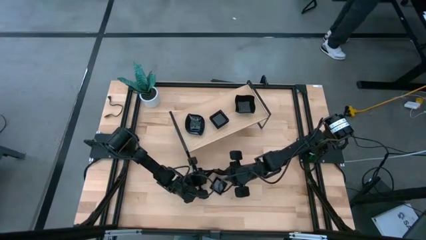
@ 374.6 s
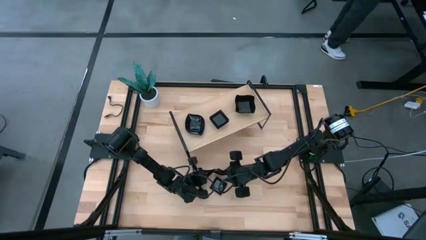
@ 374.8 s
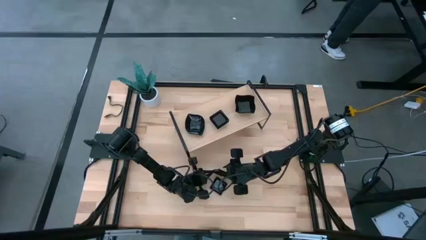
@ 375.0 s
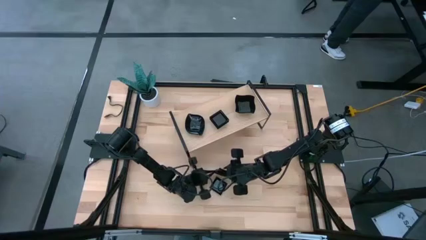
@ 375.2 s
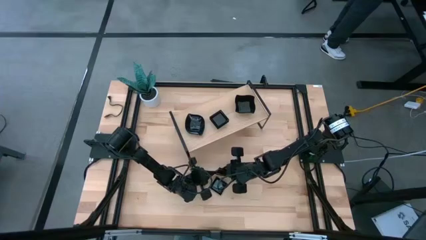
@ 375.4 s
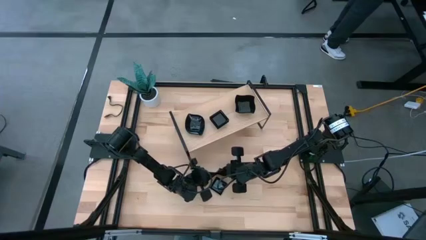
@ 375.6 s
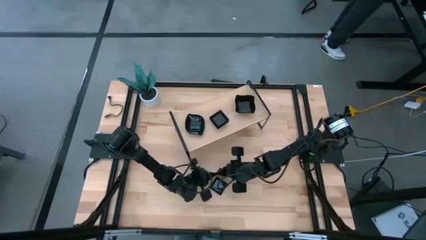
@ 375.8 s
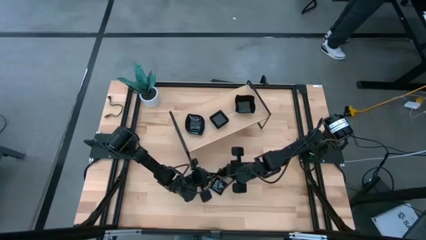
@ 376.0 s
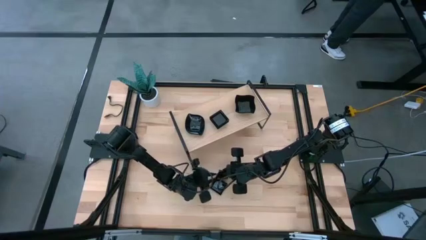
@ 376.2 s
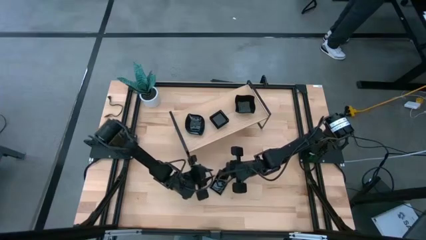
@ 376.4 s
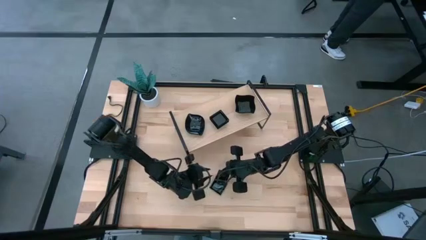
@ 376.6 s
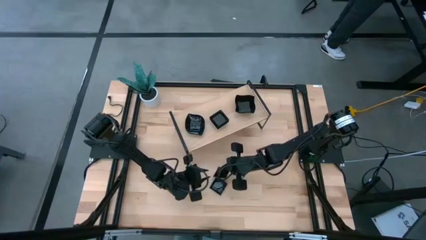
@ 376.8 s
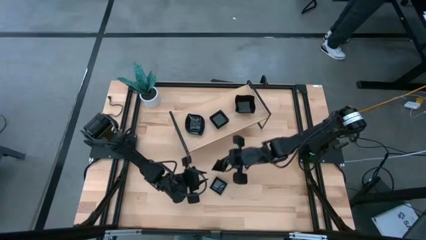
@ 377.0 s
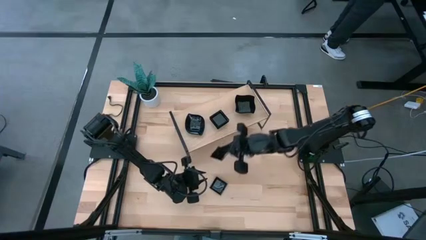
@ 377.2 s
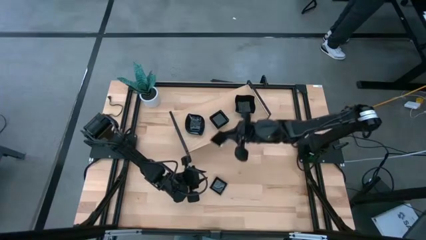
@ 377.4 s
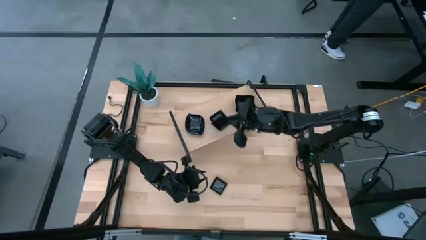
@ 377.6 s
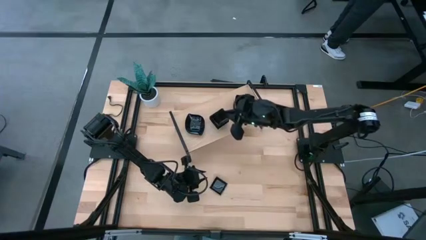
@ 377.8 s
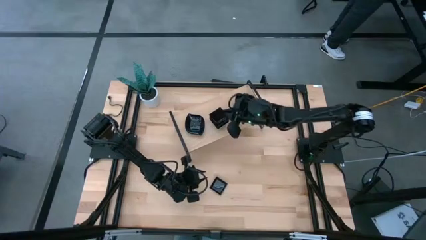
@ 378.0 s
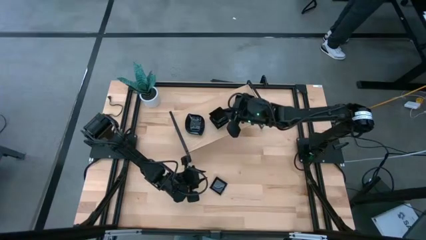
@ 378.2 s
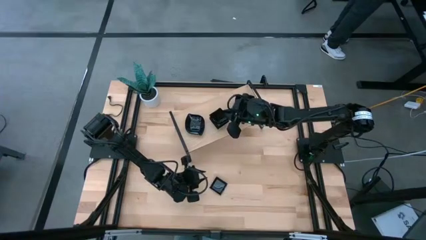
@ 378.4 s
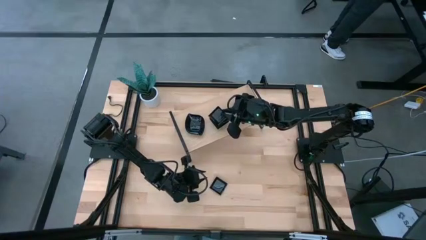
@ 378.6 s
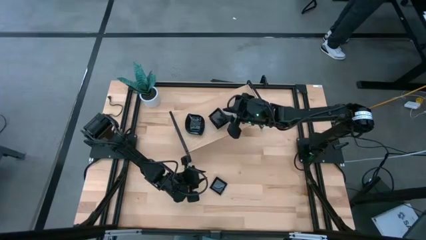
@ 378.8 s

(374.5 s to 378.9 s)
Task: Pick & Place Mini shaped plates
Stack the black square plate on top of the black square plate on the shelf

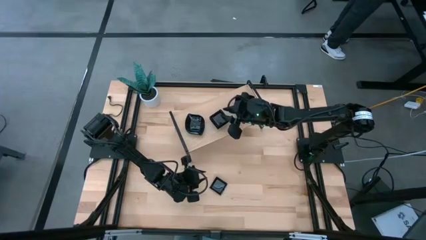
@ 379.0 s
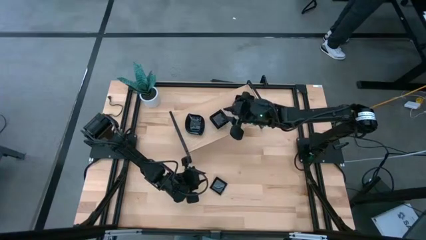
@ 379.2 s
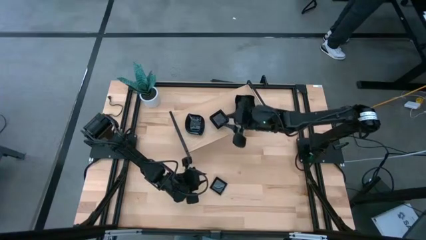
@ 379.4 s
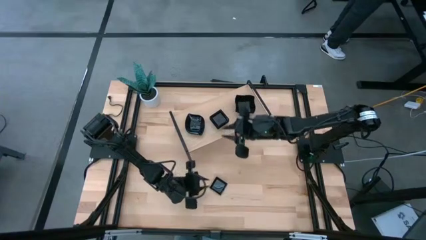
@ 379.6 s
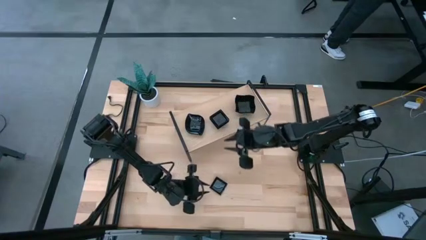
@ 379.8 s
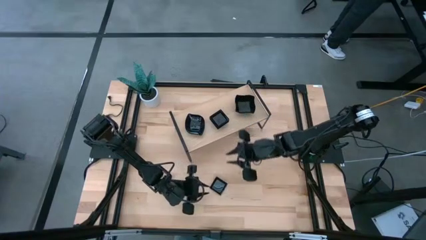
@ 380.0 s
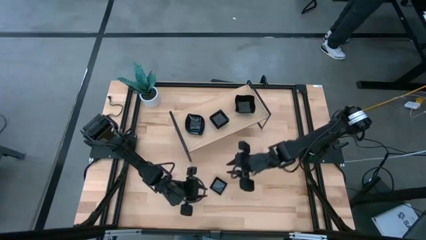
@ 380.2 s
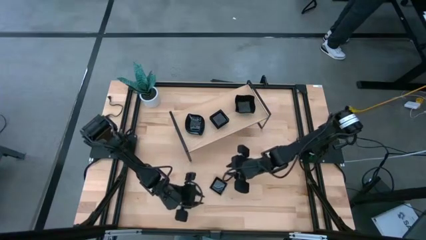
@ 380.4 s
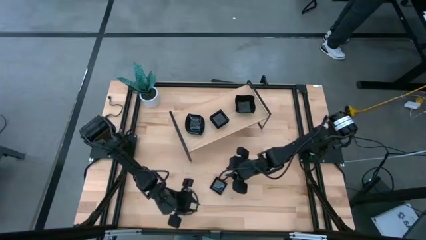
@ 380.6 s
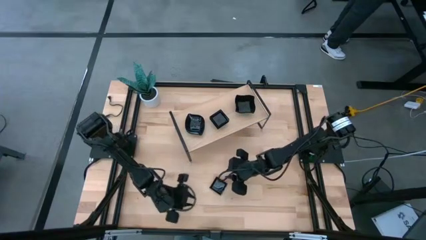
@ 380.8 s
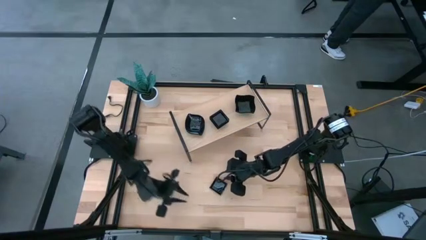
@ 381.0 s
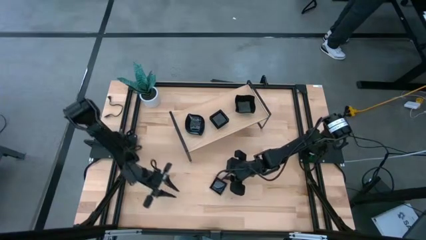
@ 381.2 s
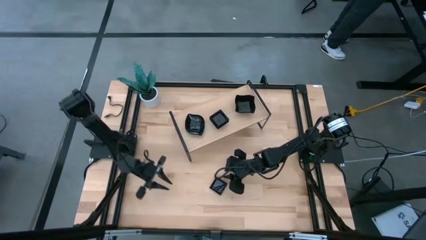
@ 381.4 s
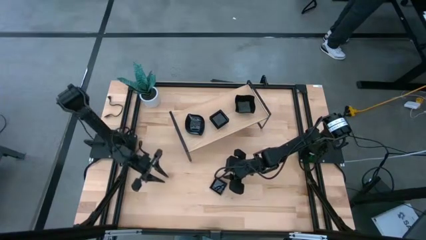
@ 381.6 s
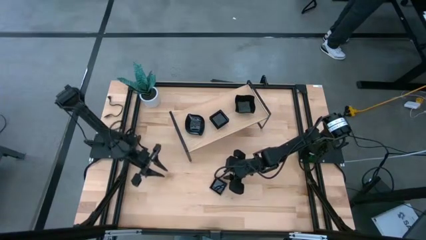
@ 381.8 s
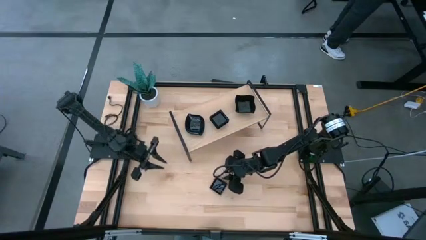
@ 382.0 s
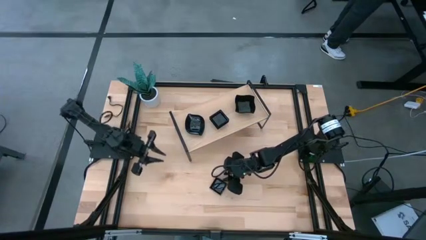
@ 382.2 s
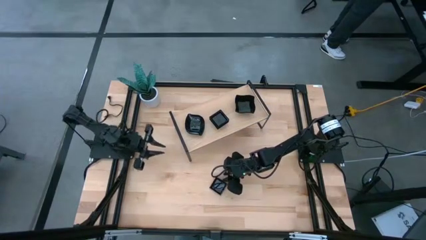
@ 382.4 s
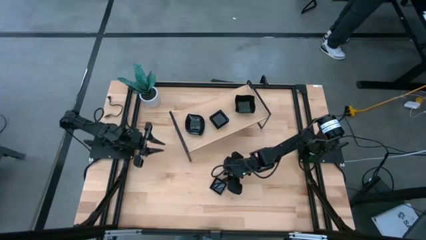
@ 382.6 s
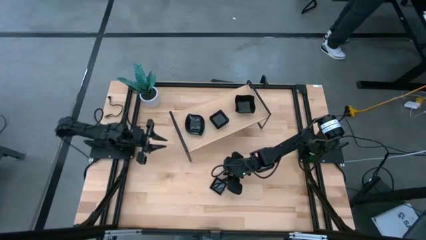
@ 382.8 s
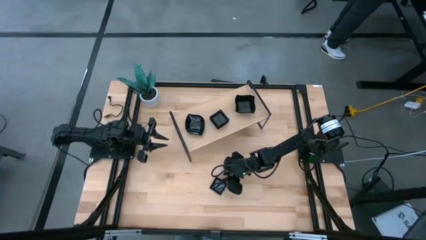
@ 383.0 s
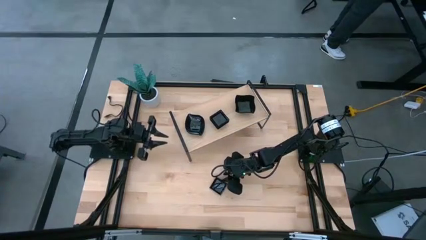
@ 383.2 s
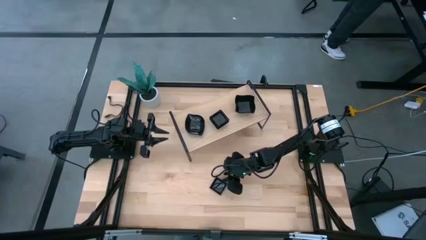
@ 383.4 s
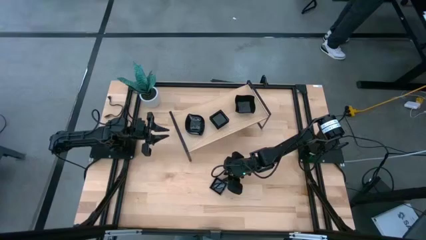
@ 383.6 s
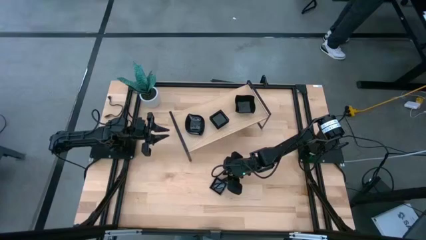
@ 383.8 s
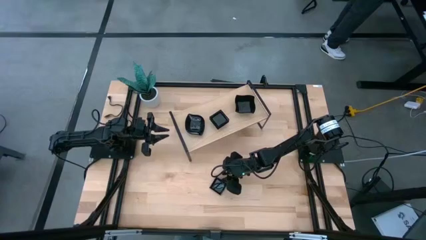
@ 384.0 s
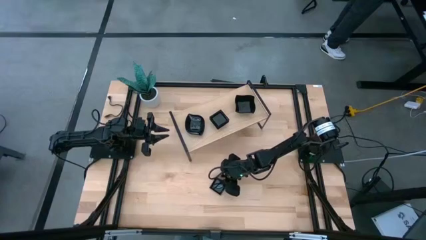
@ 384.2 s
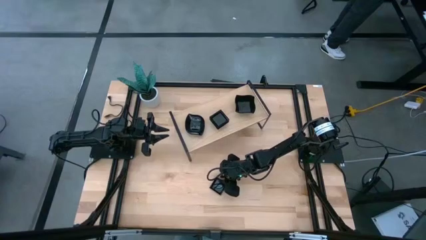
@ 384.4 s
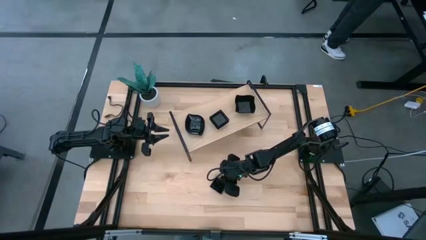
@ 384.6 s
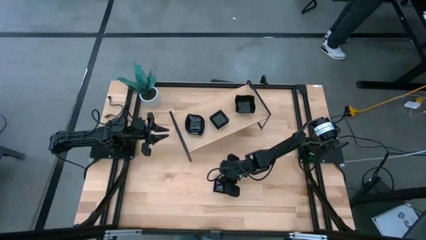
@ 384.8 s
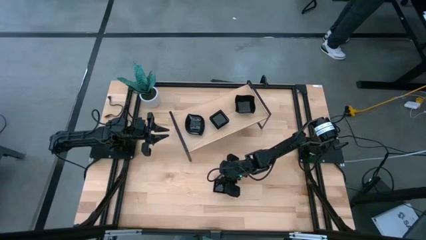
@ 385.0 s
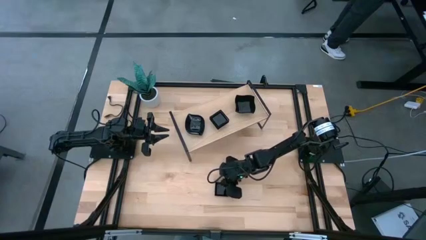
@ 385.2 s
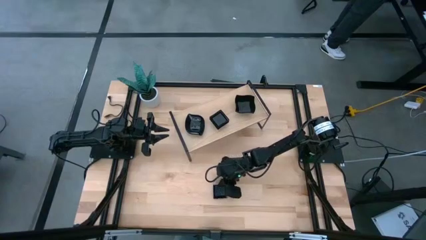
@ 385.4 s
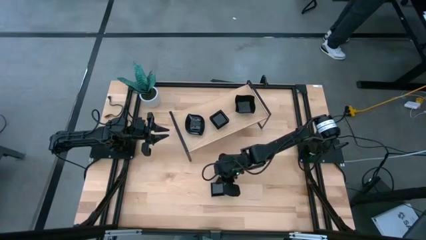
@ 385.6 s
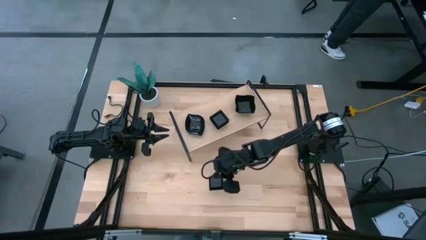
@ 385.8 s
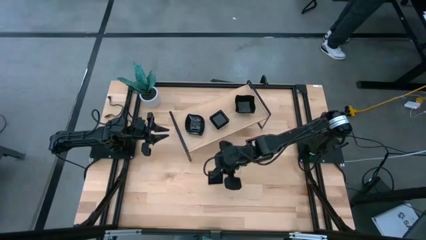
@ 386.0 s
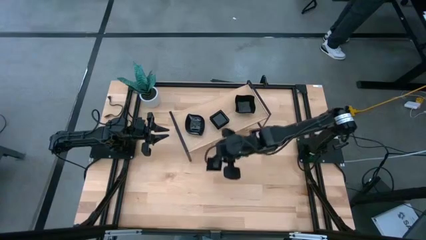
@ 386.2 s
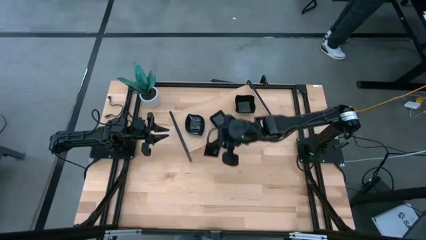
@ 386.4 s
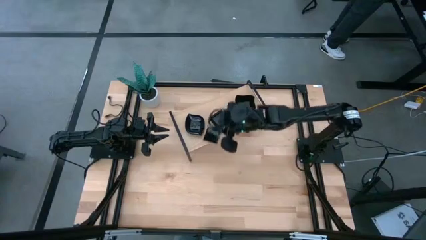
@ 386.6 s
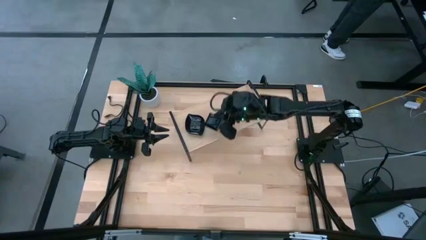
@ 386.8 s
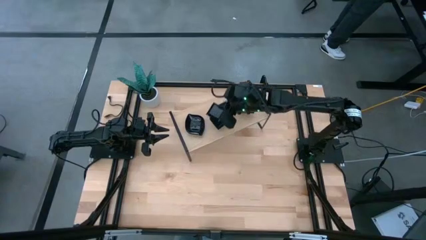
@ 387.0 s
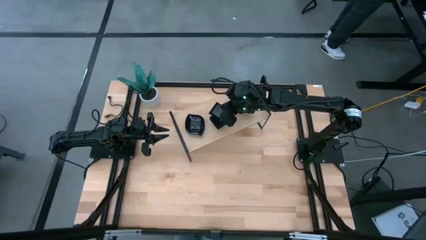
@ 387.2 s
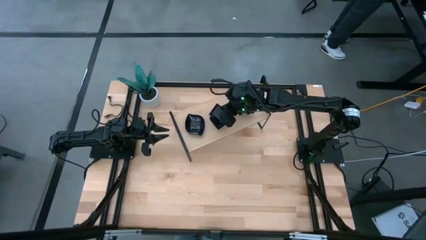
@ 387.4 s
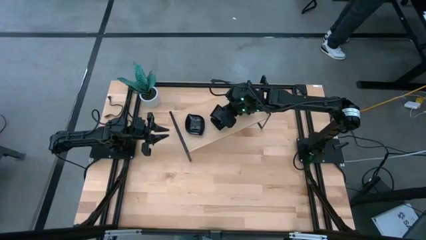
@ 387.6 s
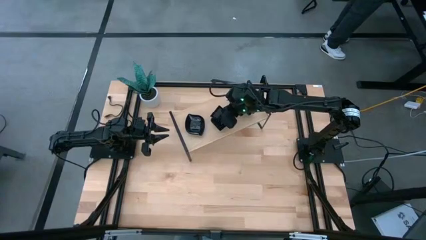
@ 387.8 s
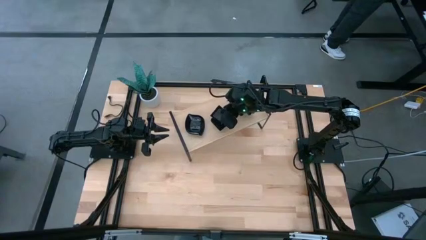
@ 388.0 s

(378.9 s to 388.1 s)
Stack the black square plate on top of the black square plate on the shelf

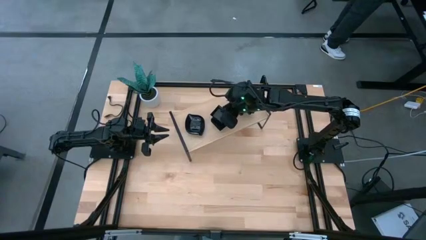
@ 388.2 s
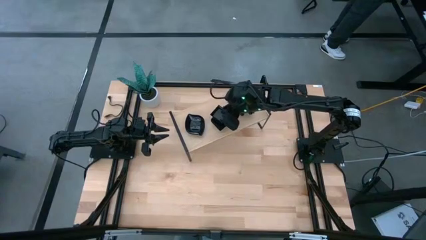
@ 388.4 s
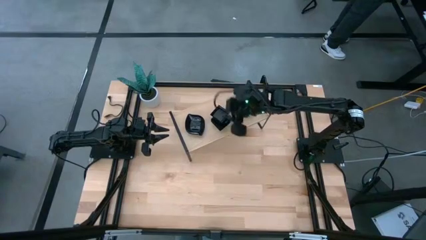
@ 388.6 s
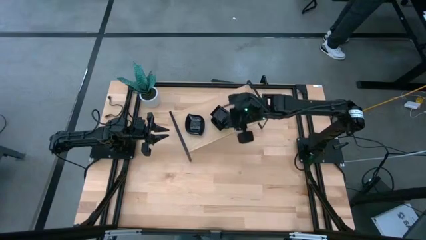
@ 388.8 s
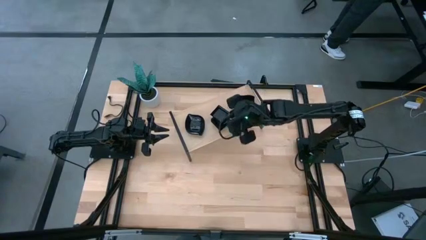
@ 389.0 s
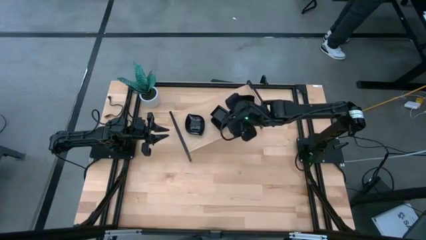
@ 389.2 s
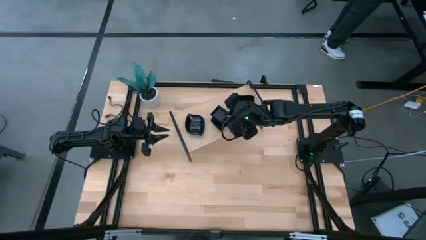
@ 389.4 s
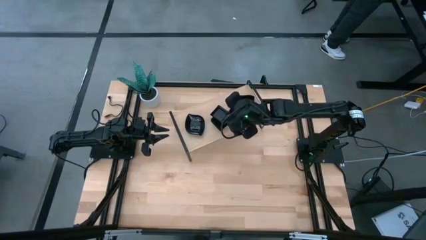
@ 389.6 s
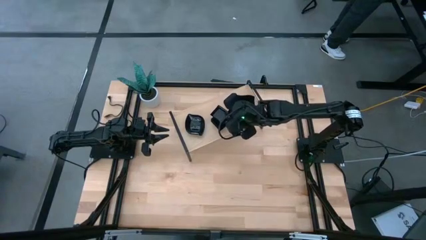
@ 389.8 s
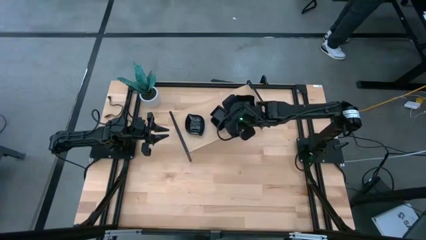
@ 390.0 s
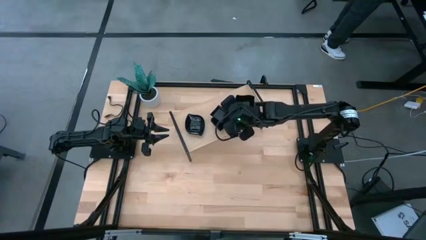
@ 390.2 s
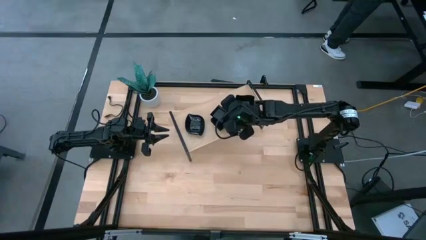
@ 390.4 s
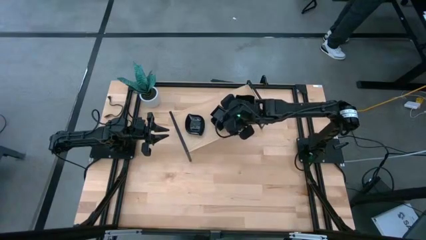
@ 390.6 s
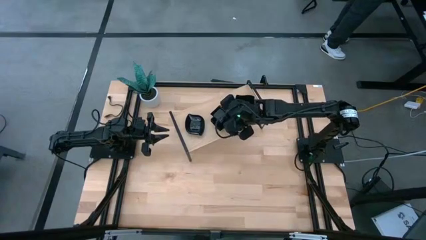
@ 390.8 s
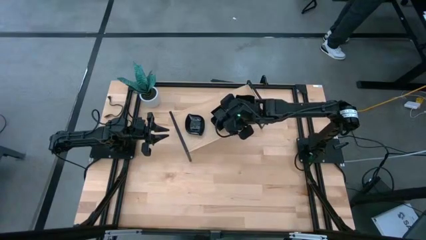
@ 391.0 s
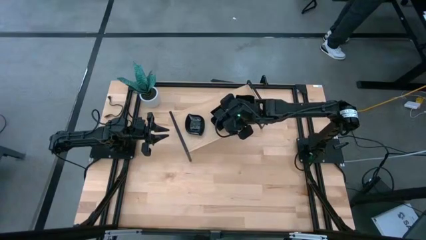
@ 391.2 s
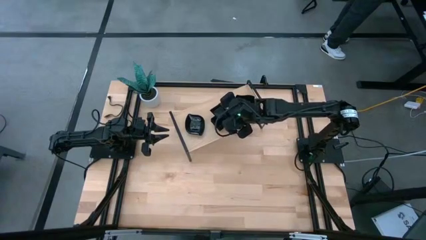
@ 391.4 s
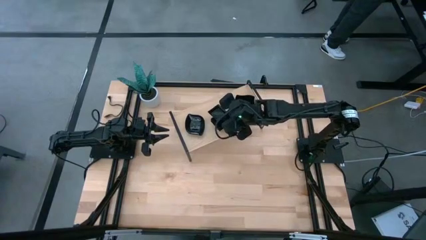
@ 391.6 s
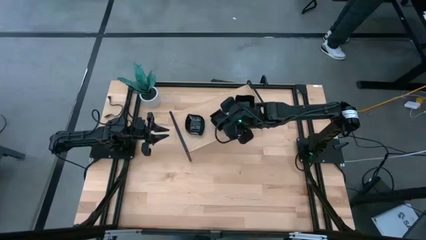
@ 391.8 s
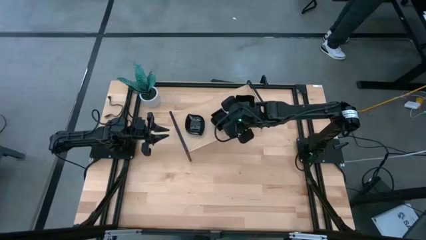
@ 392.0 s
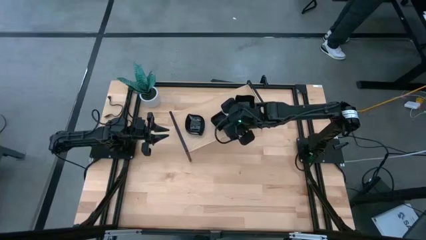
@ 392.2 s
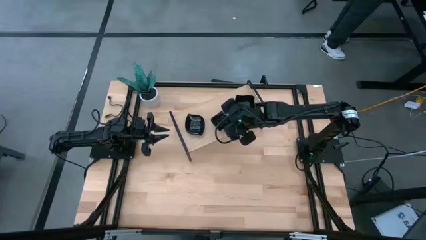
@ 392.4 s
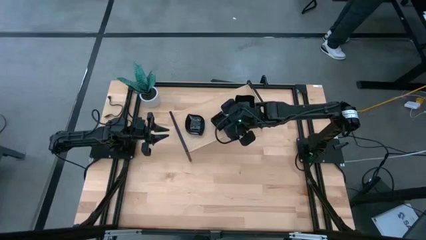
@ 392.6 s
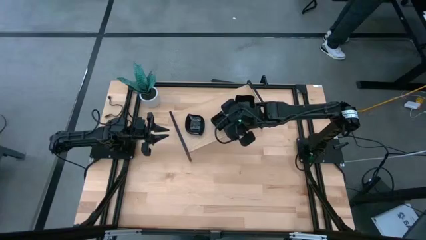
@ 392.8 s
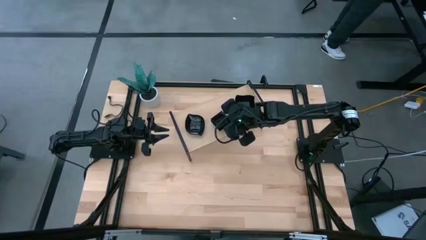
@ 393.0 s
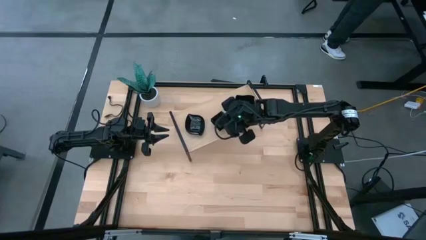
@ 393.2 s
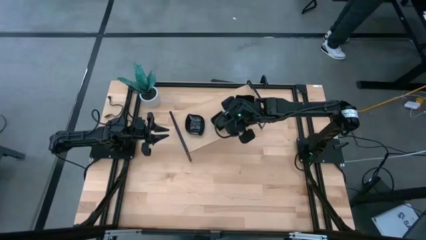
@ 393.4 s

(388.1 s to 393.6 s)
Stack the black square plate on top of the black square plate on the shelf
